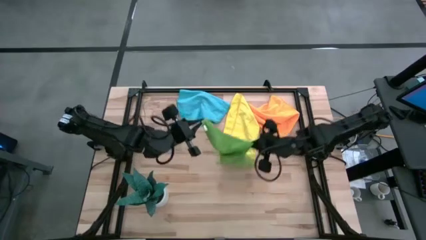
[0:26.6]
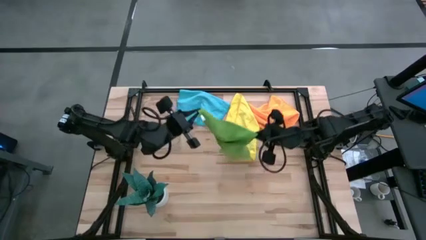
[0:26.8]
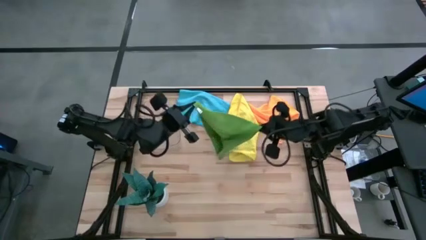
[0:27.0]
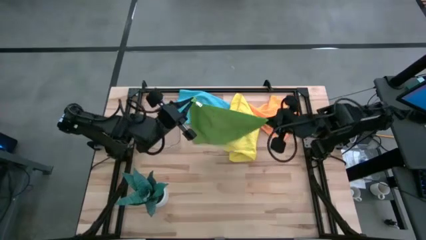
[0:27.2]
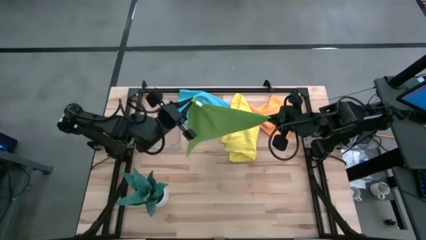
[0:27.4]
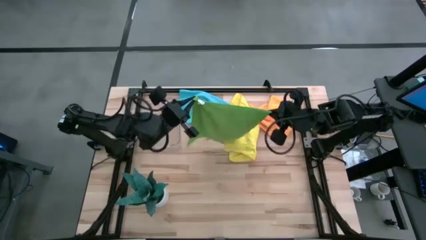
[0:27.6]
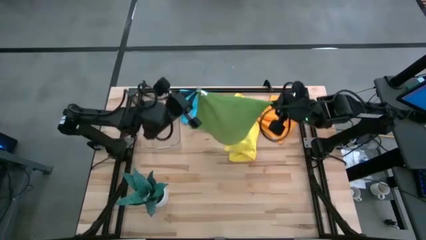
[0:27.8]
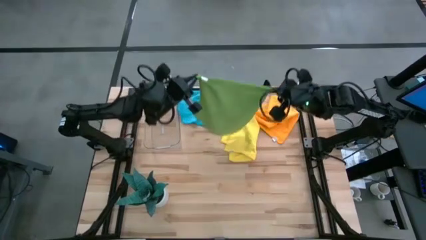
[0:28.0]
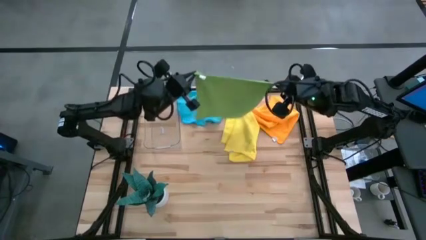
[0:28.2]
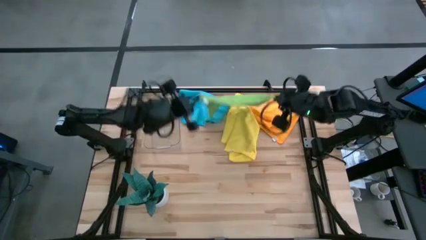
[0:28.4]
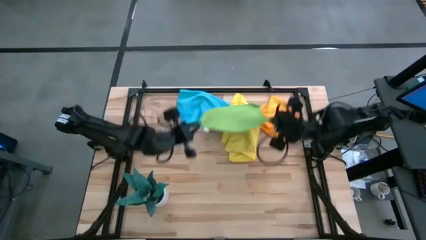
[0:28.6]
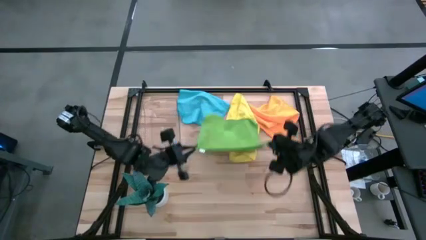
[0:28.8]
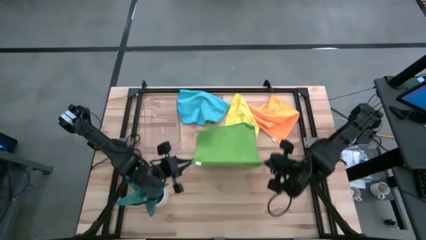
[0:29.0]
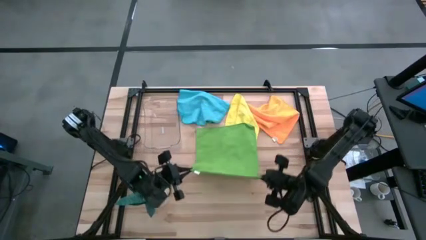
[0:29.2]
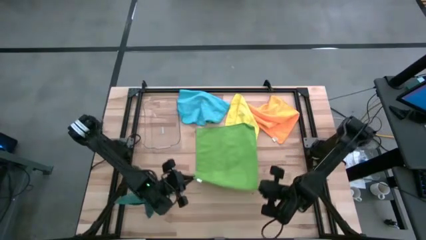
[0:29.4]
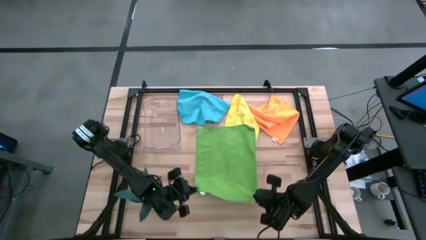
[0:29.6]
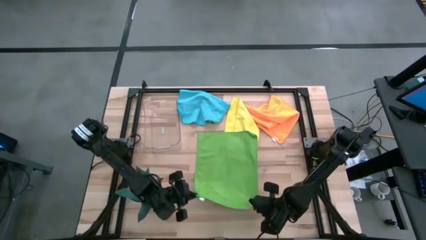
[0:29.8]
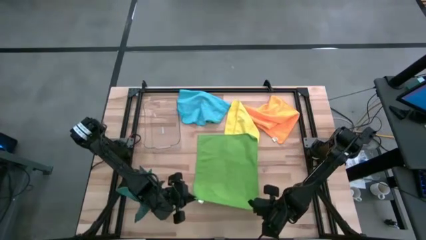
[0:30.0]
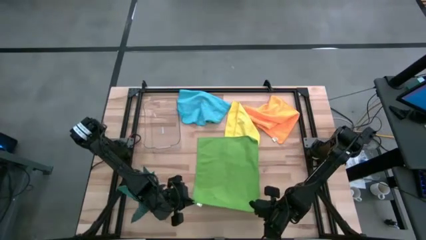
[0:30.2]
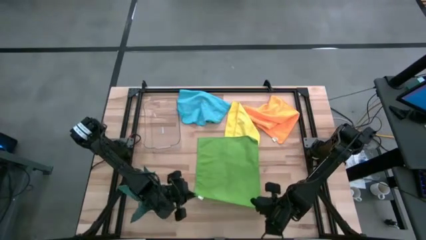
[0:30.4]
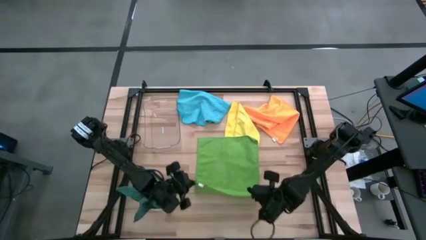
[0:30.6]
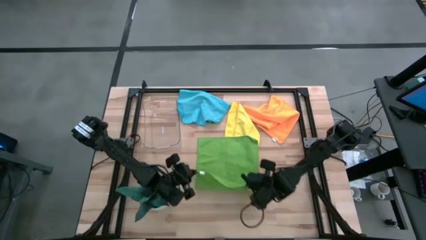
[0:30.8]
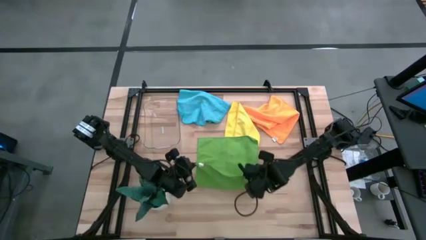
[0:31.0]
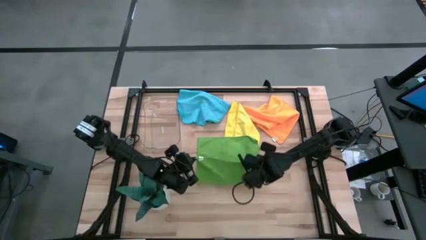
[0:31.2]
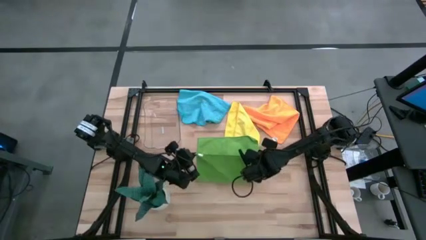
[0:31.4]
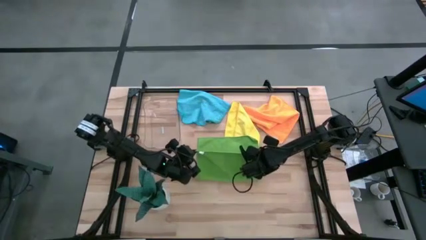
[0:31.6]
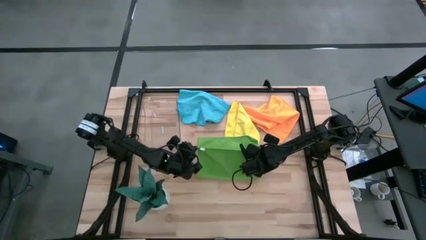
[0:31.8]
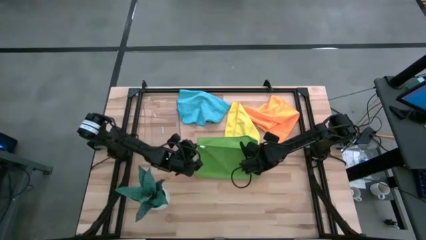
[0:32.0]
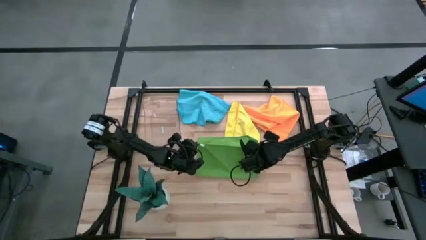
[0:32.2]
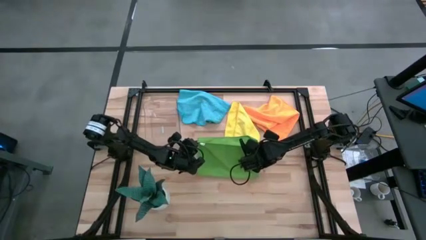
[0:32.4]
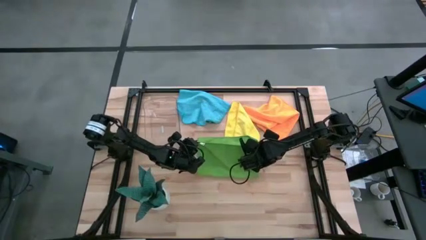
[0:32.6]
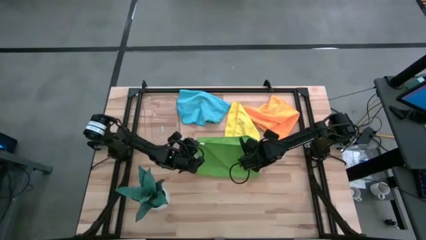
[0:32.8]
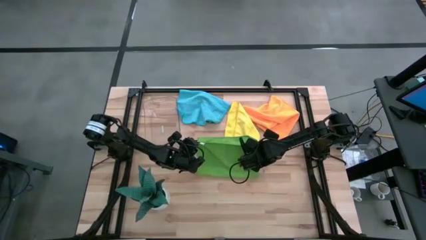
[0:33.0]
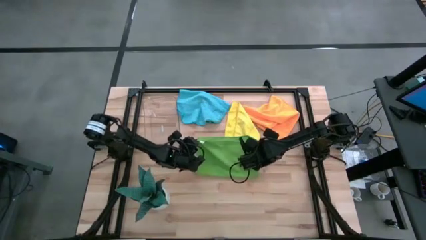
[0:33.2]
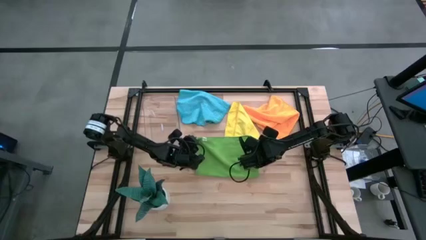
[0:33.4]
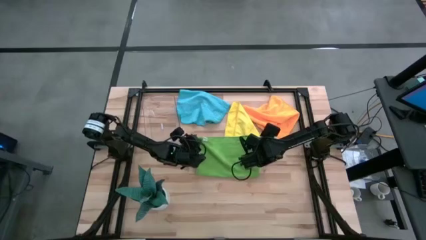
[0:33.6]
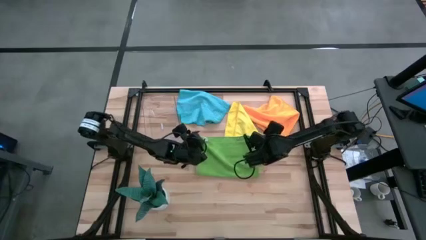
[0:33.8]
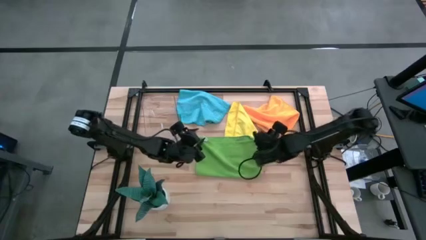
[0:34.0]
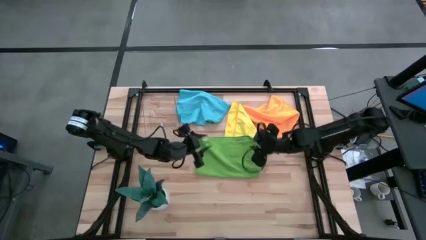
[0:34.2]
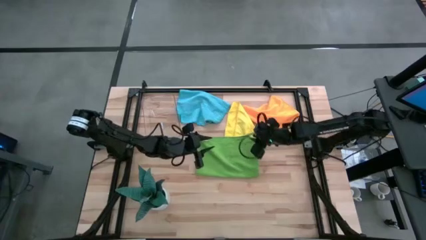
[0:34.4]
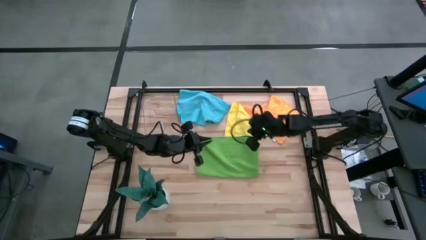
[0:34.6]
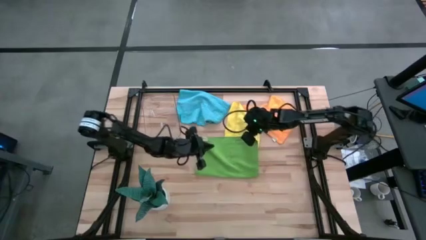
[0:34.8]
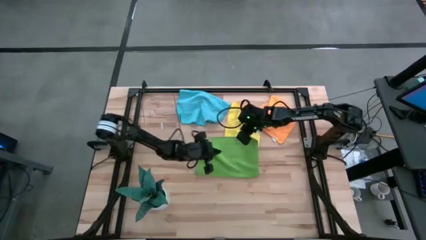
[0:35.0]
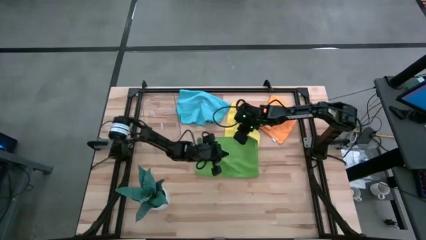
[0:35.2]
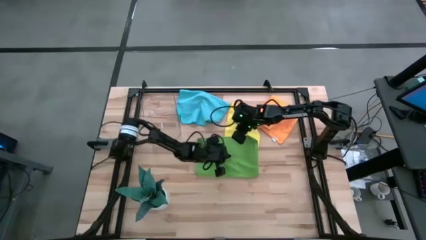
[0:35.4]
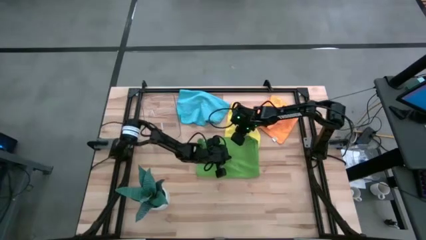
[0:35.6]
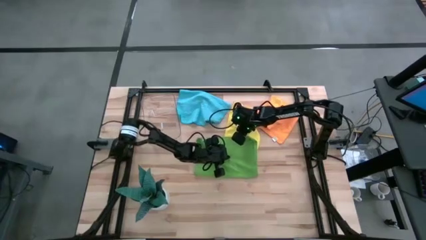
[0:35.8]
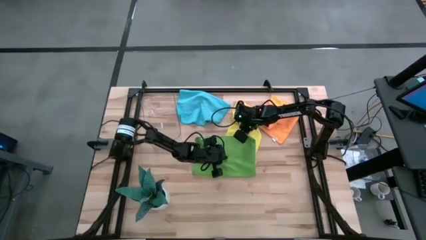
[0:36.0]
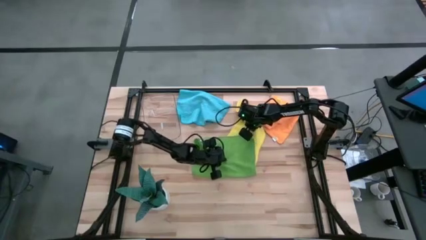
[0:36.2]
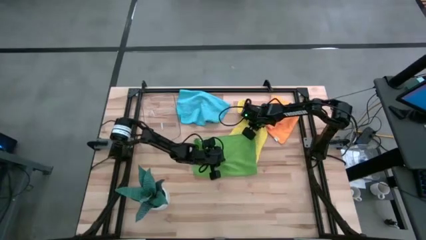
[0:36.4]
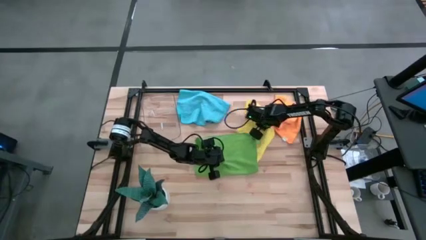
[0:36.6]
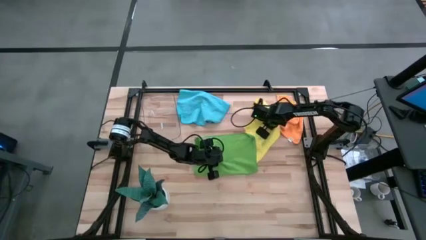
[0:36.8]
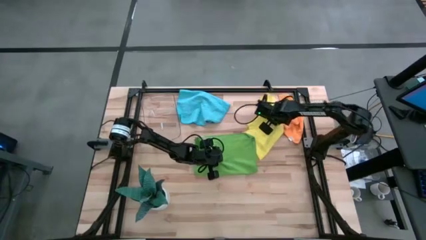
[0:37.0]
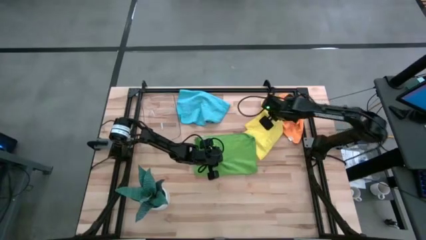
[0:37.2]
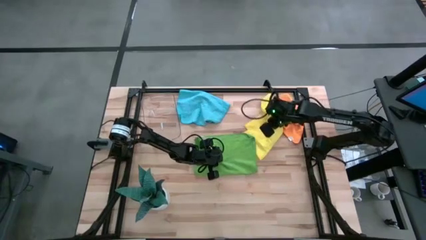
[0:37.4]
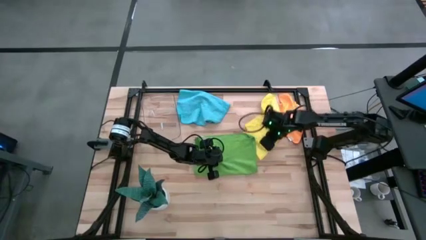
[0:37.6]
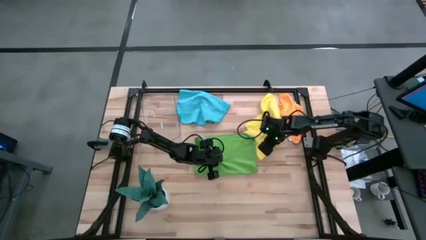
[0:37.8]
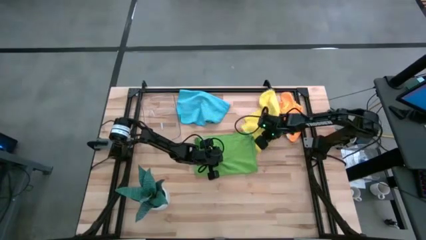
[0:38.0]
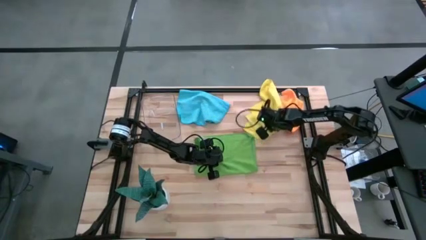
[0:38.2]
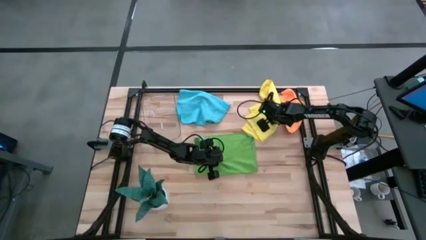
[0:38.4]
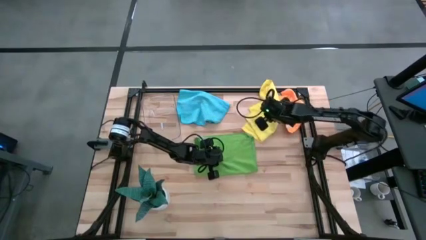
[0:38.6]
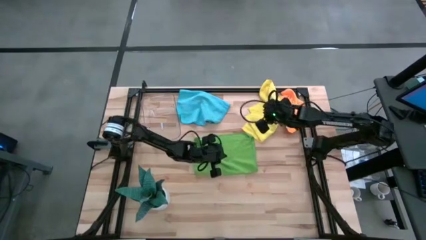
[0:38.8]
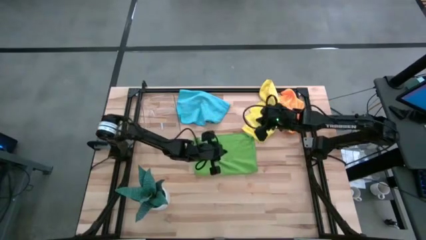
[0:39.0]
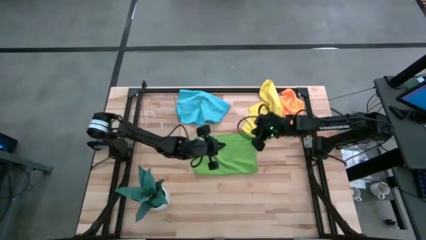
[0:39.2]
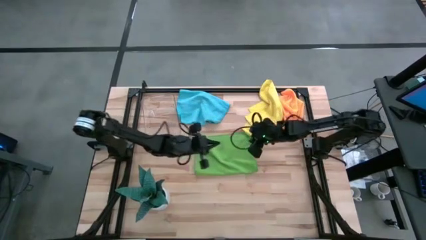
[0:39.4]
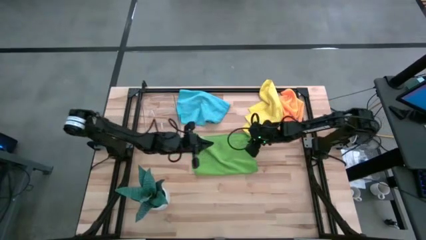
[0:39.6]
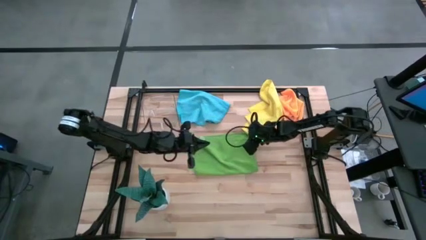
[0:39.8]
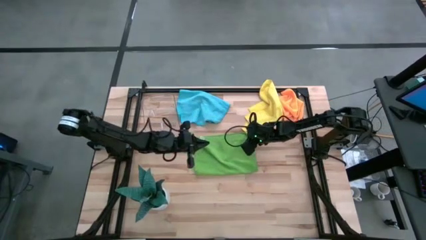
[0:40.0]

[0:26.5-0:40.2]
Task: Roll microfiber towels into tight, uniform cylinder then place into a basket
Fold the green microfiber towel
